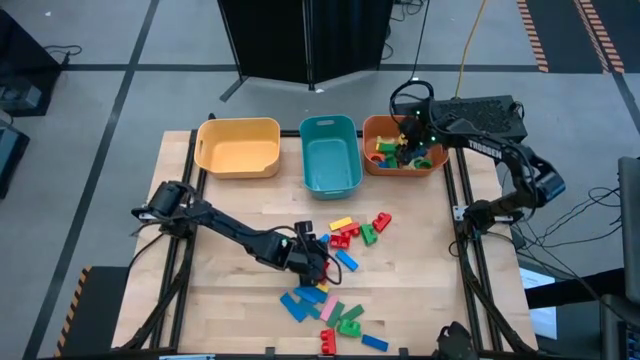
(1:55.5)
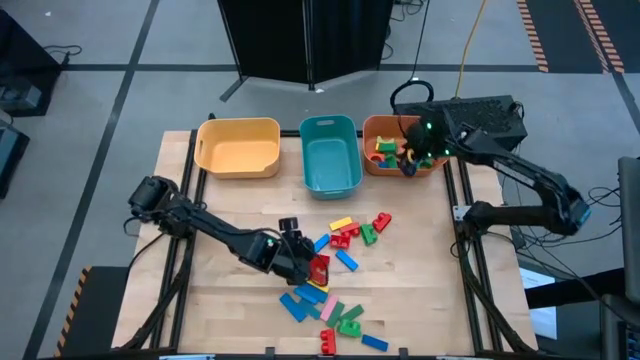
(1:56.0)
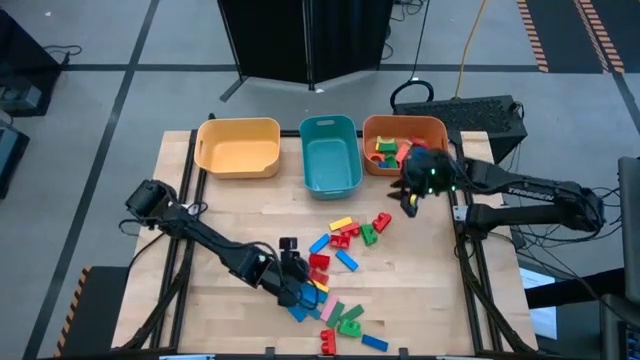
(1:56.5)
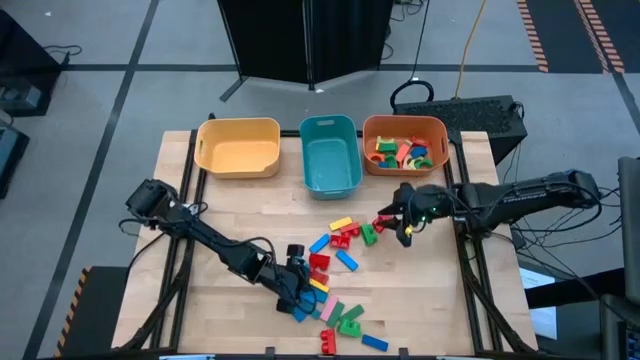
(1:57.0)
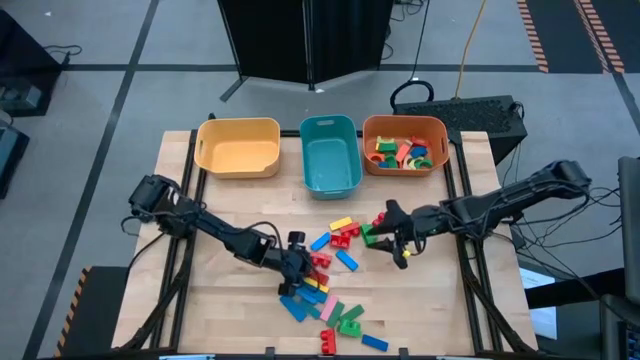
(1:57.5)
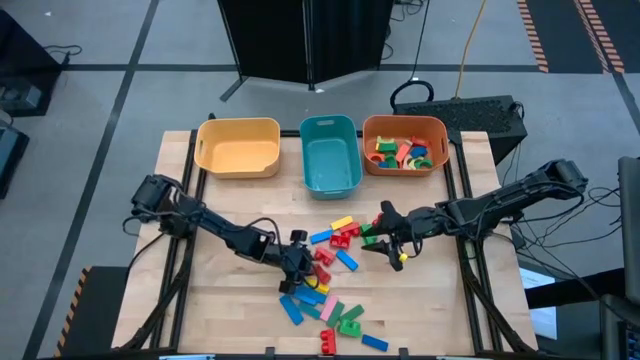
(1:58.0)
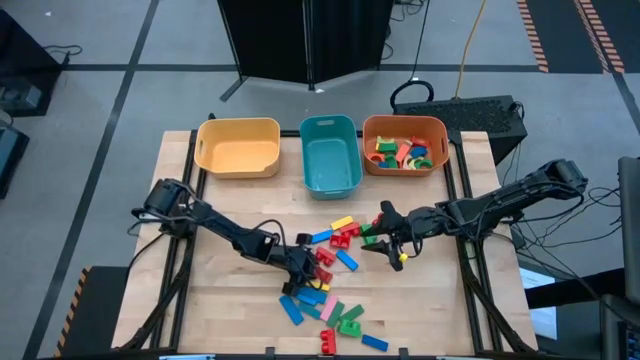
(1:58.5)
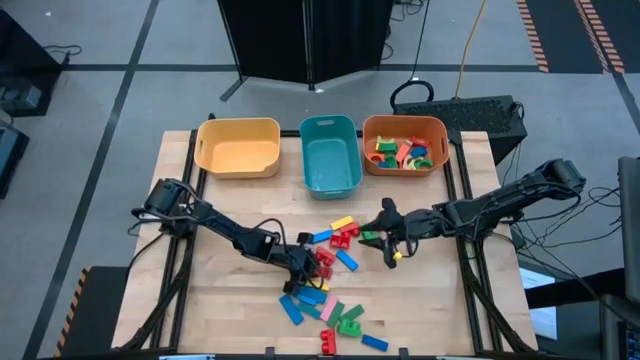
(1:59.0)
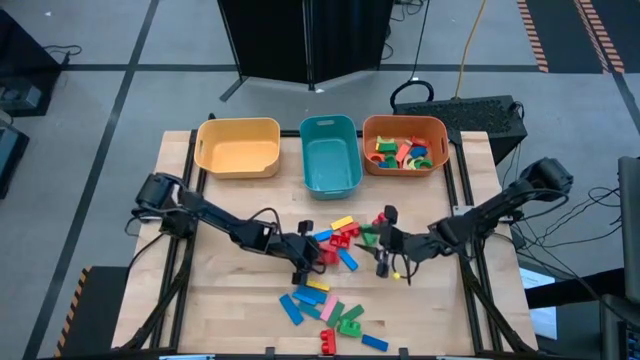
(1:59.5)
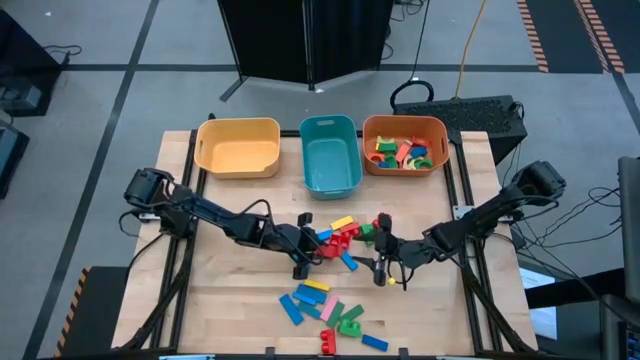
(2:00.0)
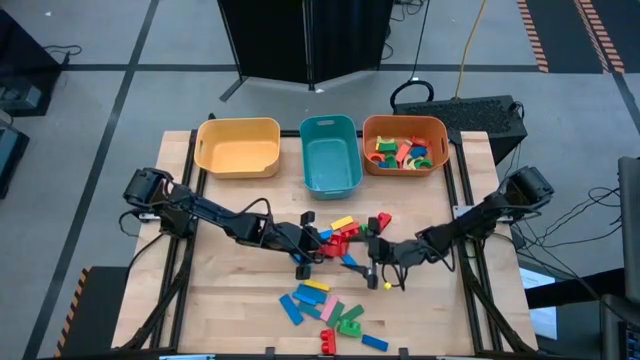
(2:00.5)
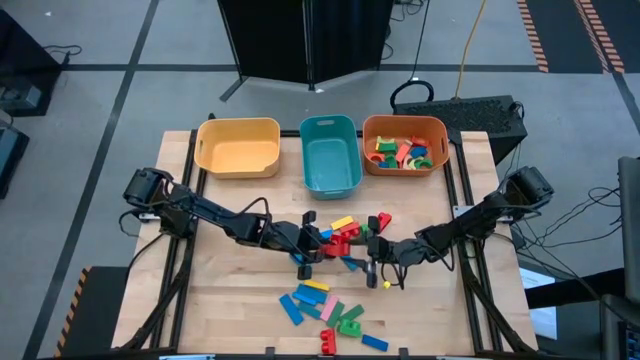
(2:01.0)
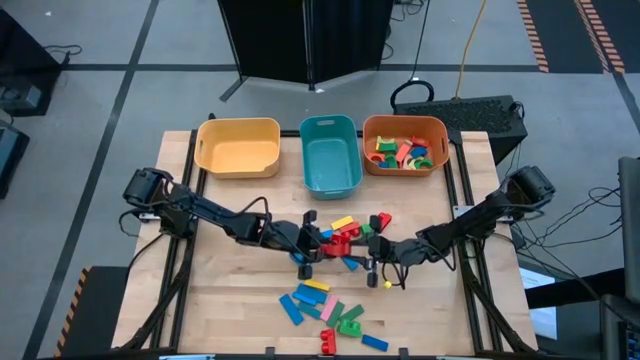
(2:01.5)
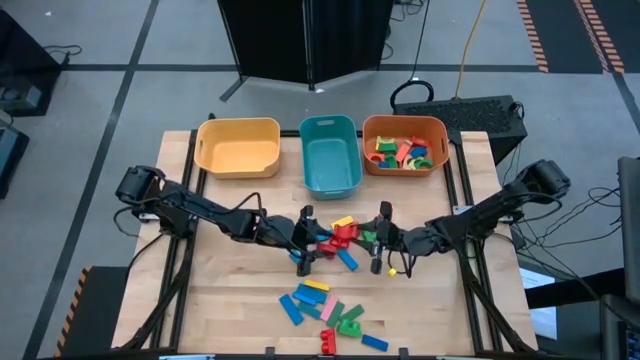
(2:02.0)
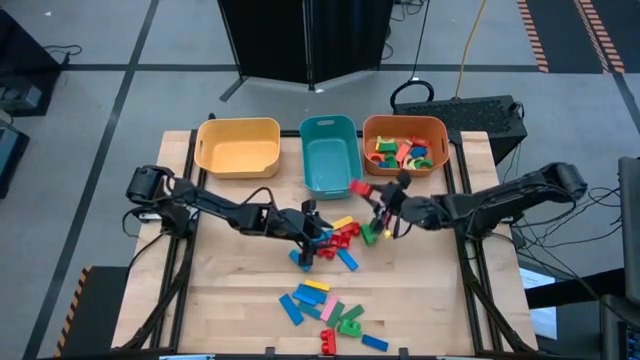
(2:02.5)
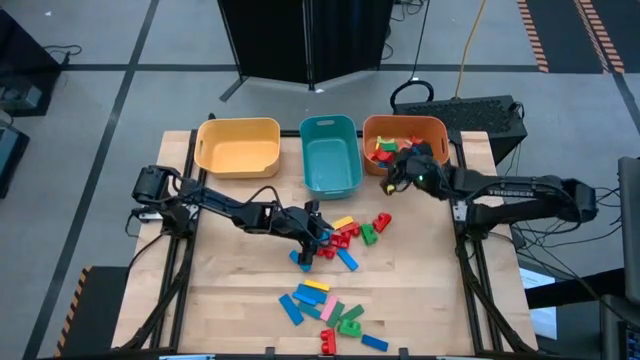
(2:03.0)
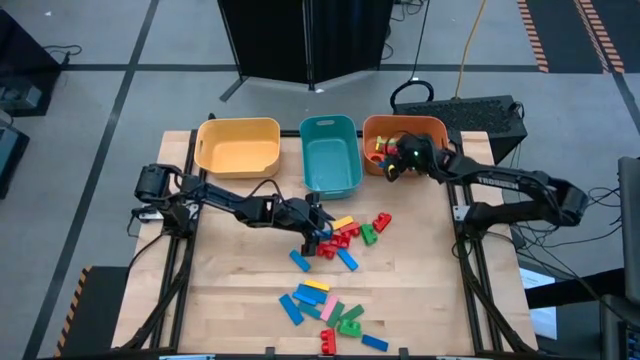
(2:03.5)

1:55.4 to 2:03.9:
Task: Sort blocks by size
Put the red arch block into the orange bin

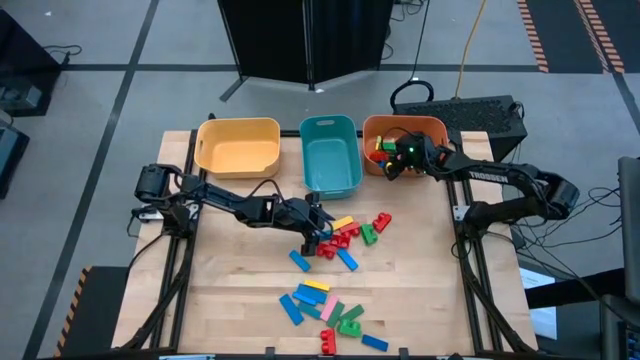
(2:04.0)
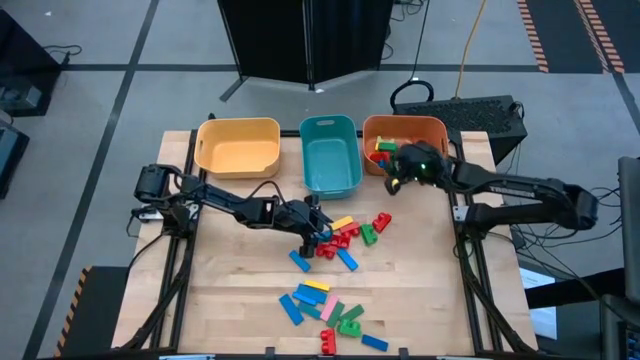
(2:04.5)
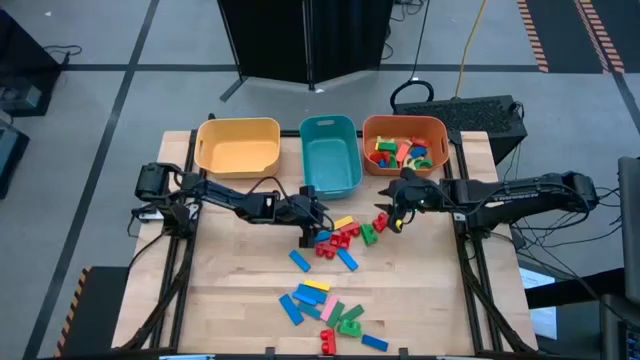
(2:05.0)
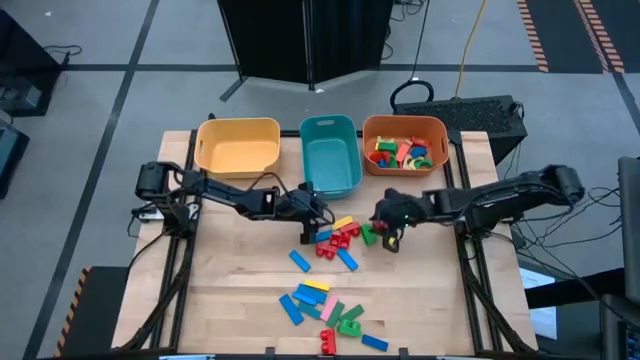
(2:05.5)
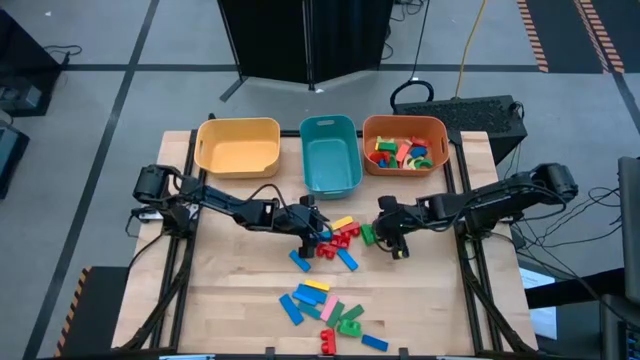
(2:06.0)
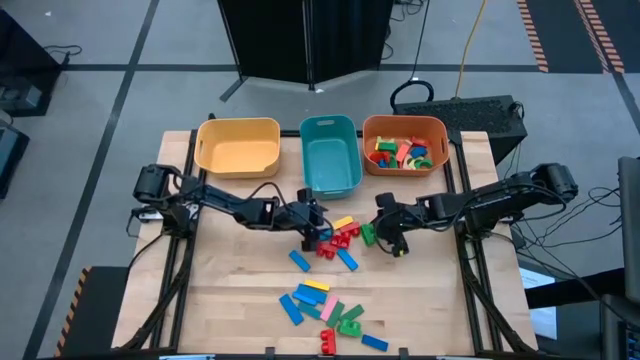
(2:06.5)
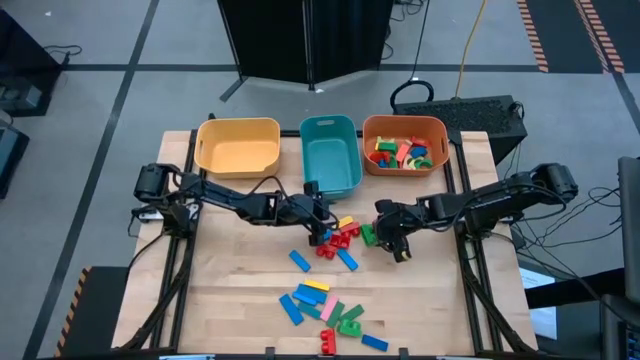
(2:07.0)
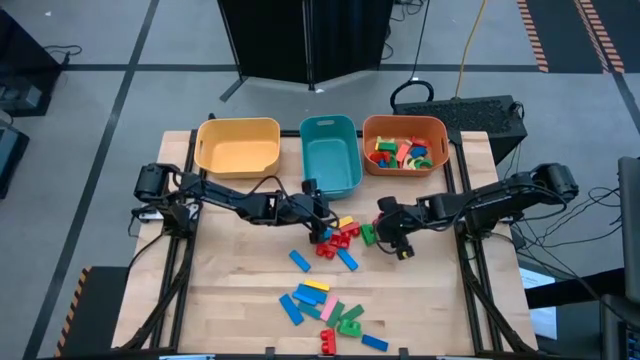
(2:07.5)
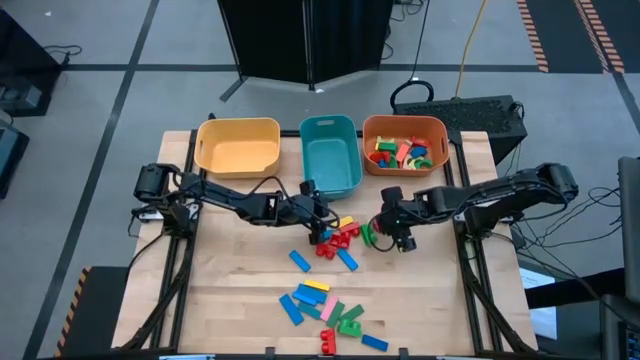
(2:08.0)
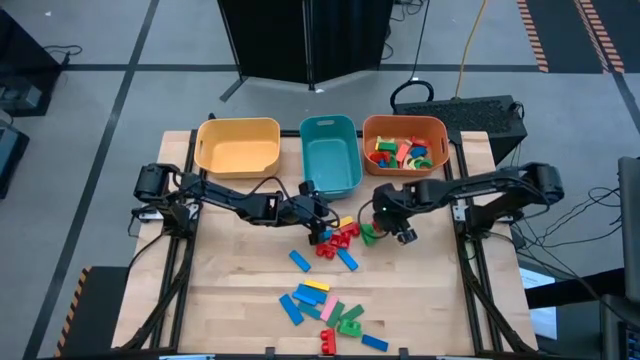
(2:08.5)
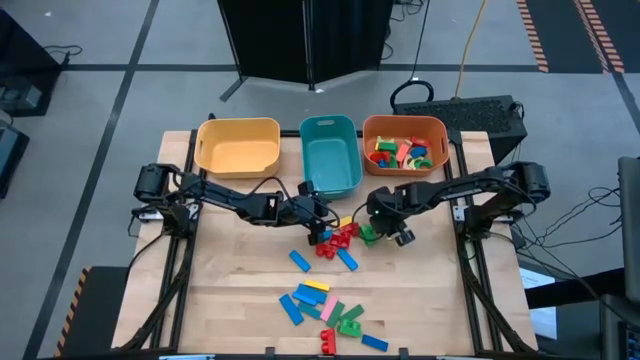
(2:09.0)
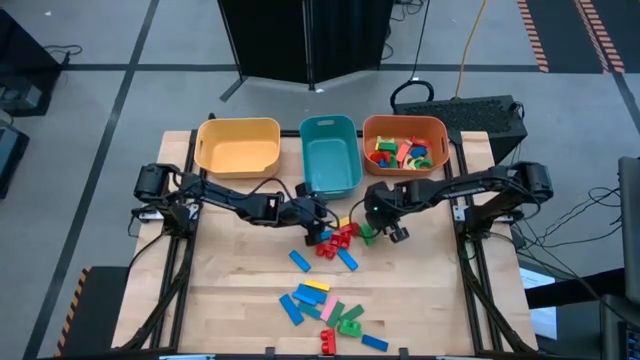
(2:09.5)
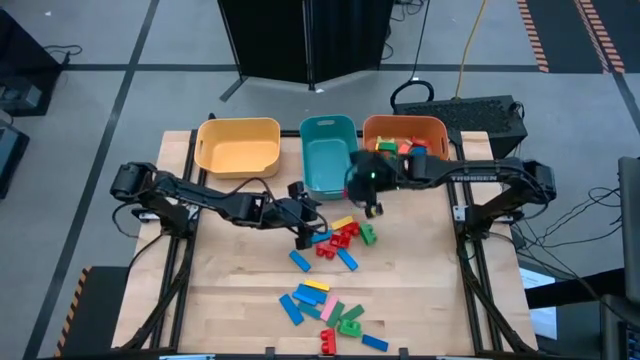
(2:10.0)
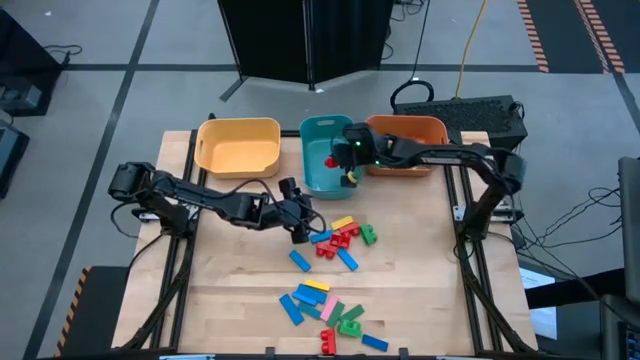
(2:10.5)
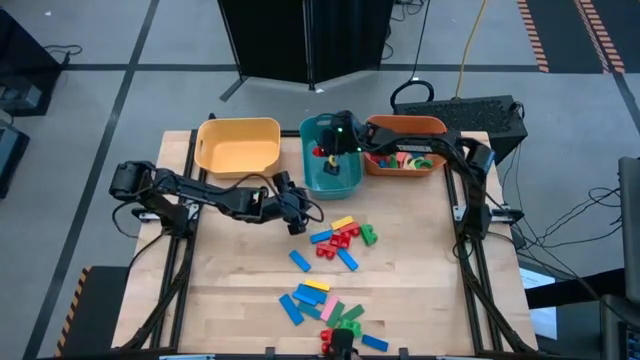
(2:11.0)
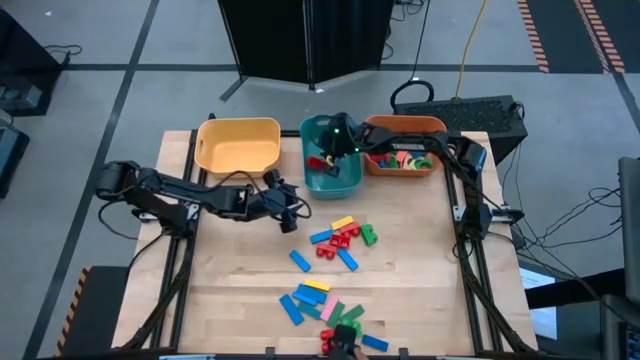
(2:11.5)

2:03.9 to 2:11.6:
Put the red 2 stud game piece into the blue bin

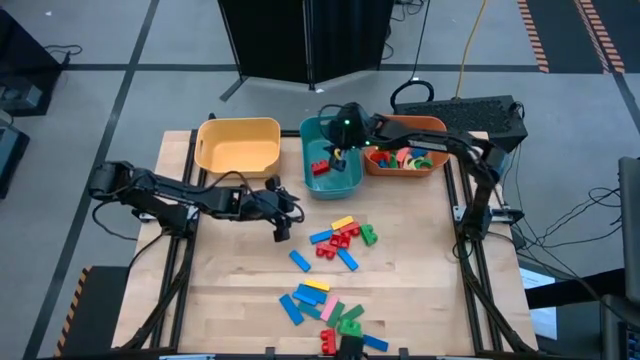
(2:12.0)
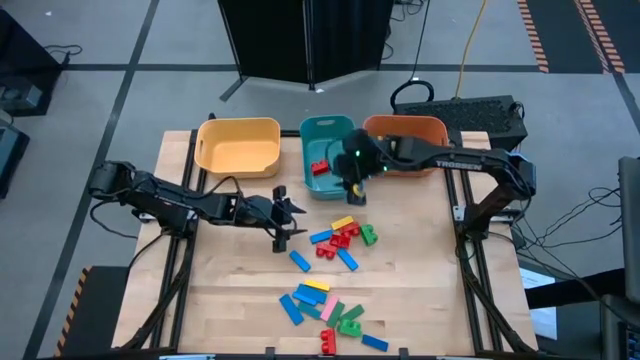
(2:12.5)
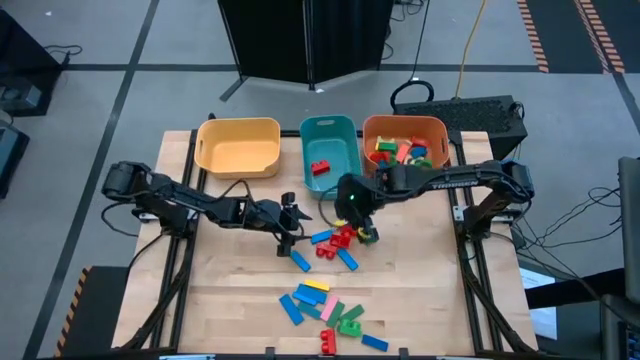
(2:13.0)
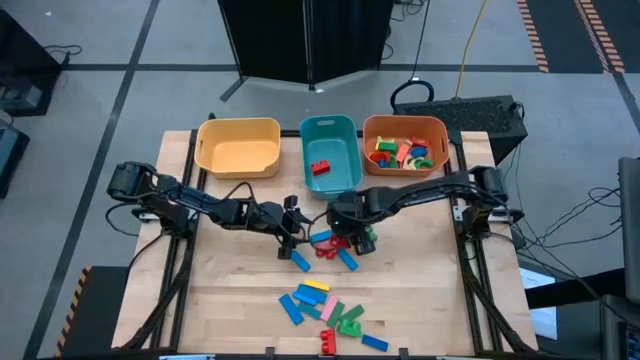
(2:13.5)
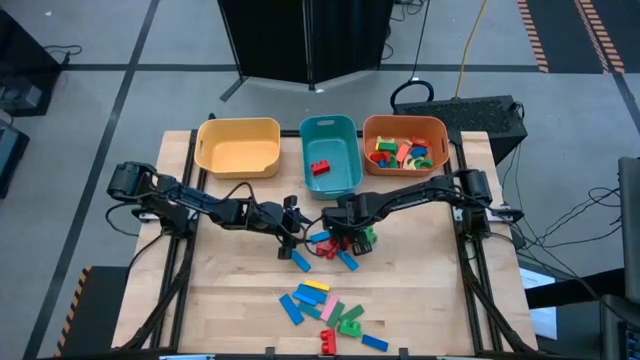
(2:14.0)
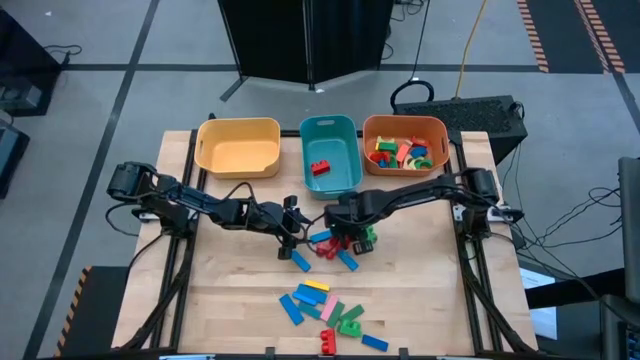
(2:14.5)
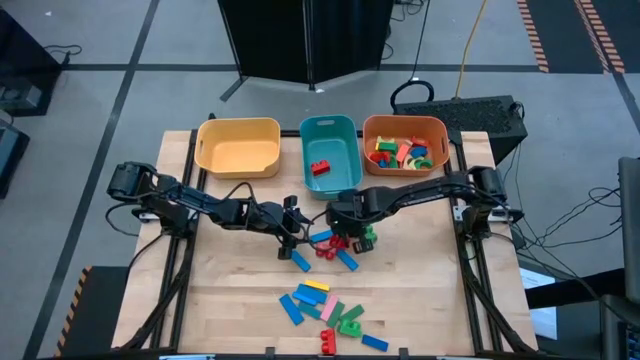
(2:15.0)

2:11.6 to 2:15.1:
Put the red 2 stud game piece into the blue bin

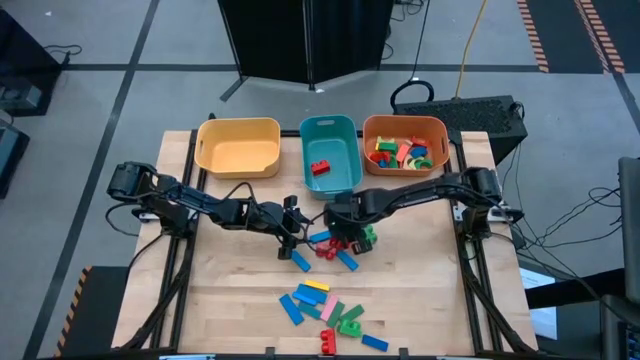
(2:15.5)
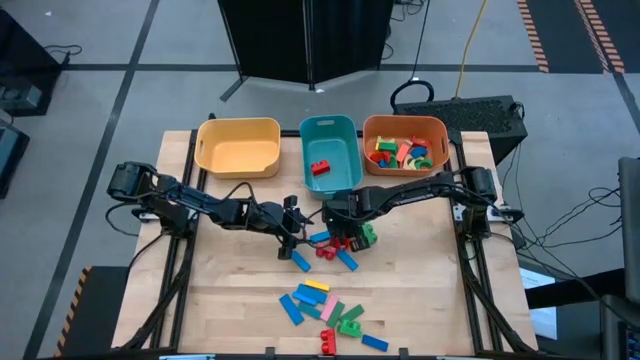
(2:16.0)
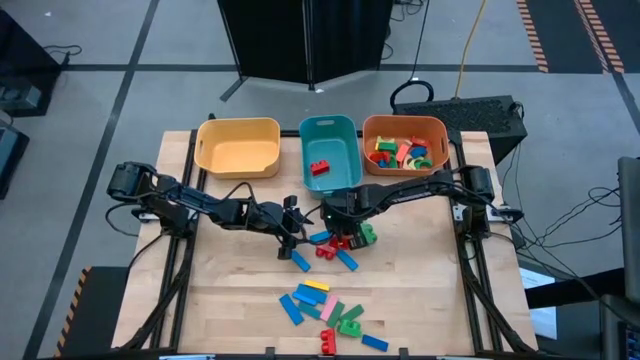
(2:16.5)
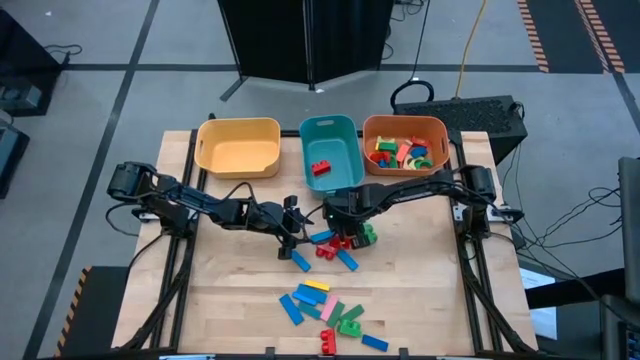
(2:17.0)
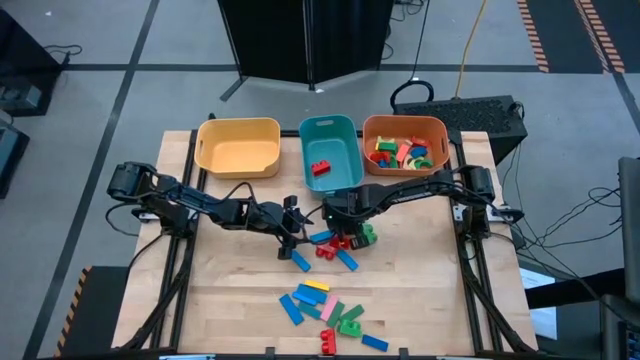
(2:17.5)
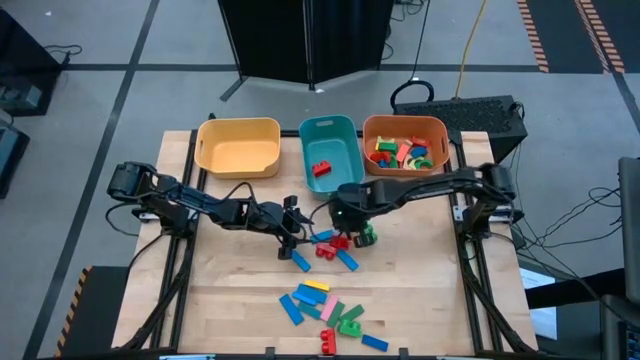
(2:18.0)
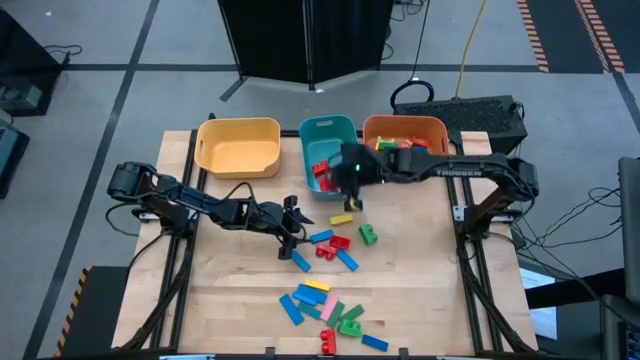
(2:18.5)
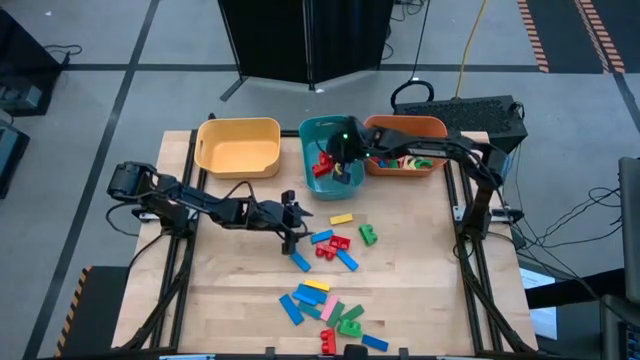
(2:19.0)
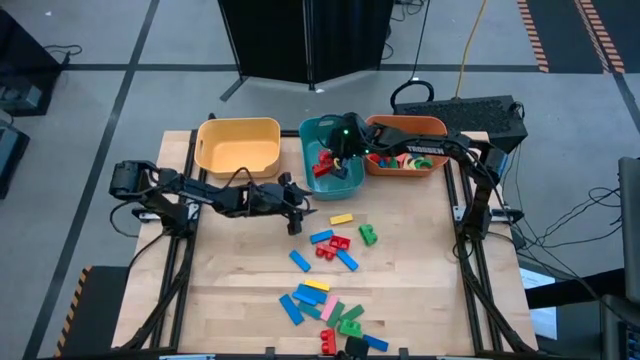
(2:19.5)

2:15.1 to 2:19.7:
Put the red 2 stud game piece into the blue bin
